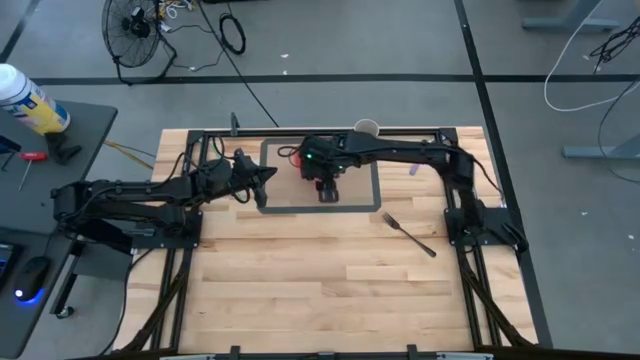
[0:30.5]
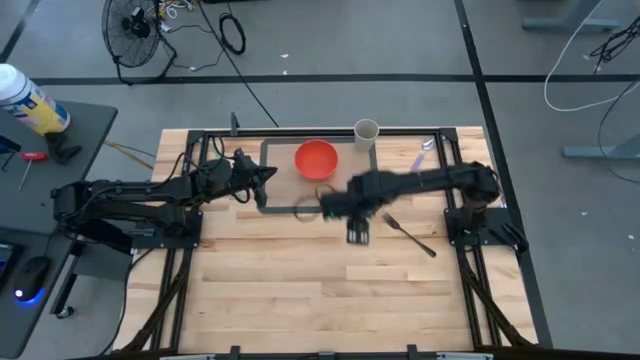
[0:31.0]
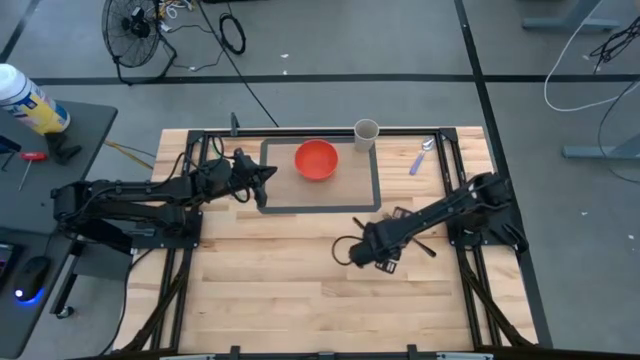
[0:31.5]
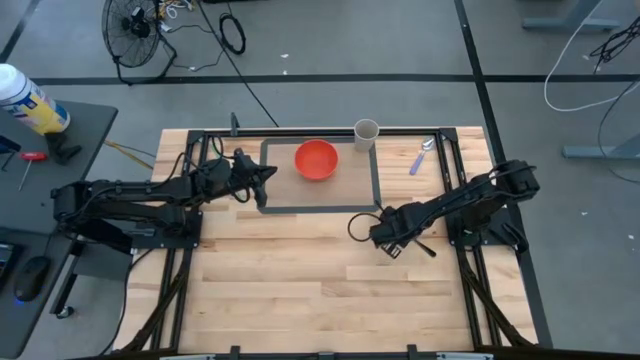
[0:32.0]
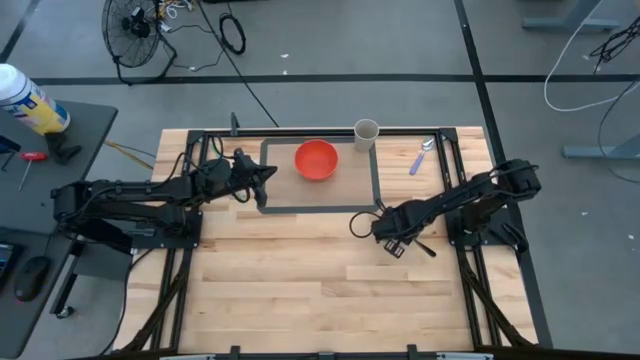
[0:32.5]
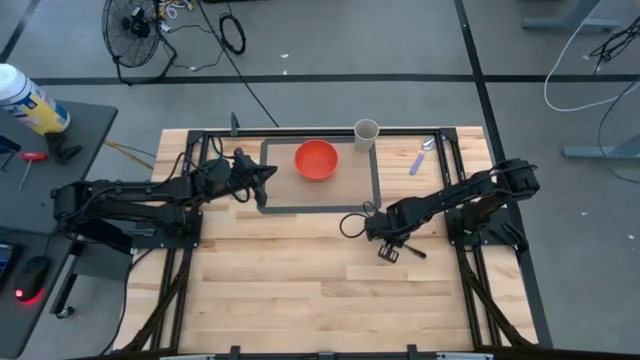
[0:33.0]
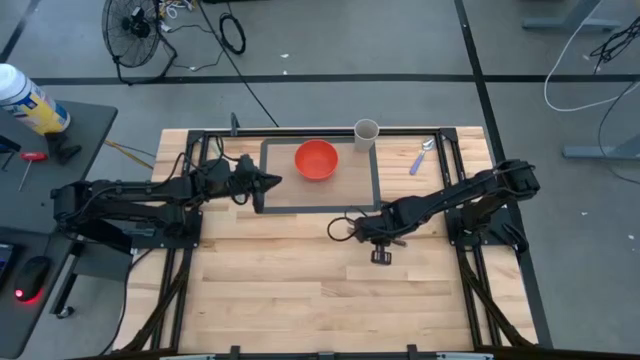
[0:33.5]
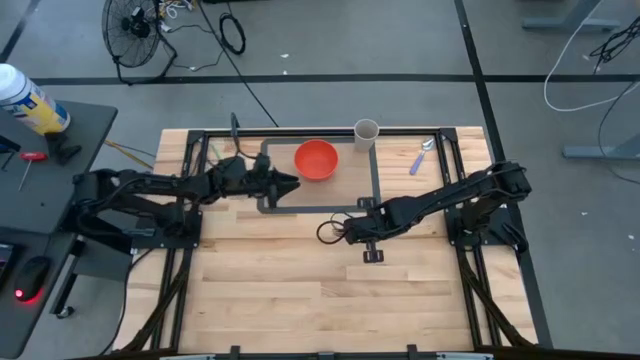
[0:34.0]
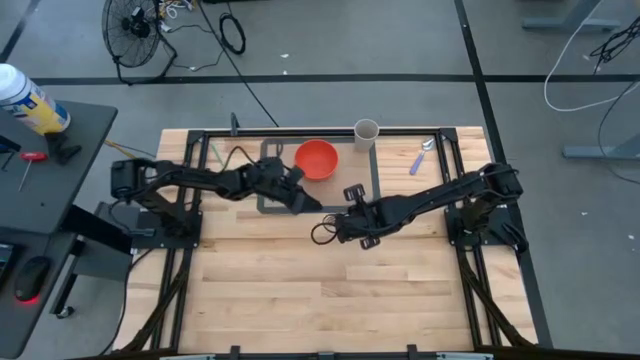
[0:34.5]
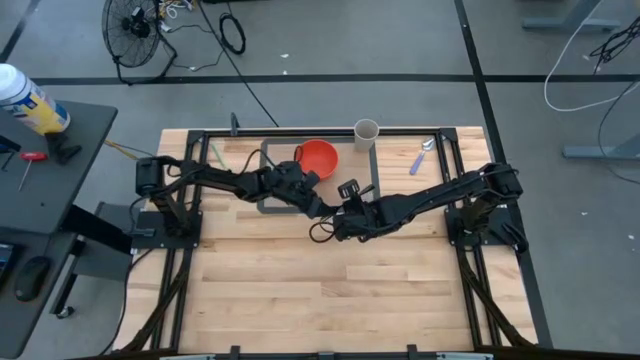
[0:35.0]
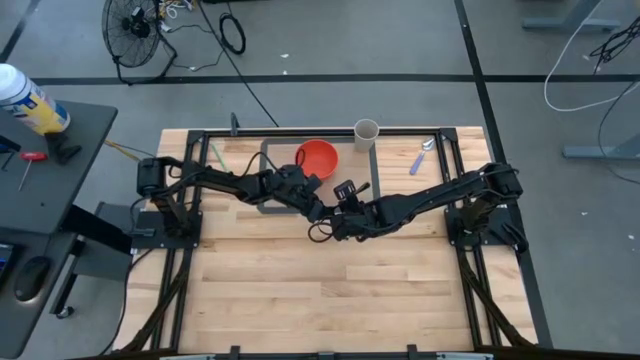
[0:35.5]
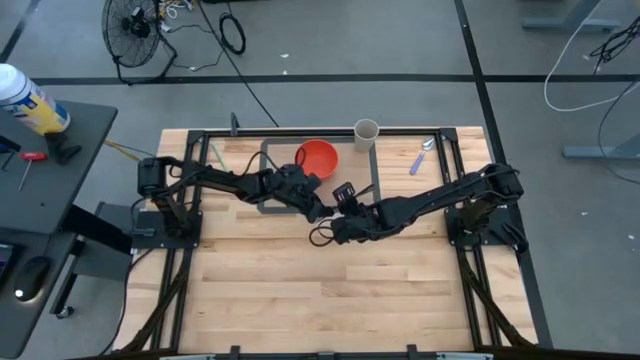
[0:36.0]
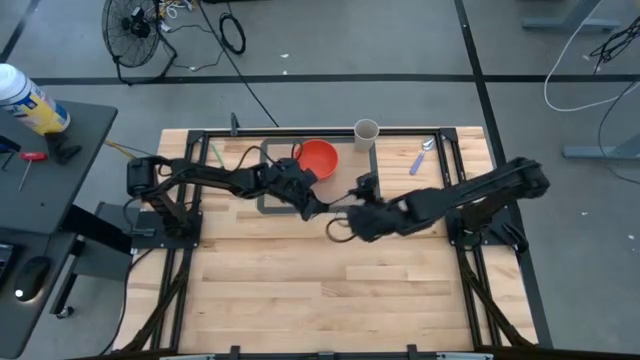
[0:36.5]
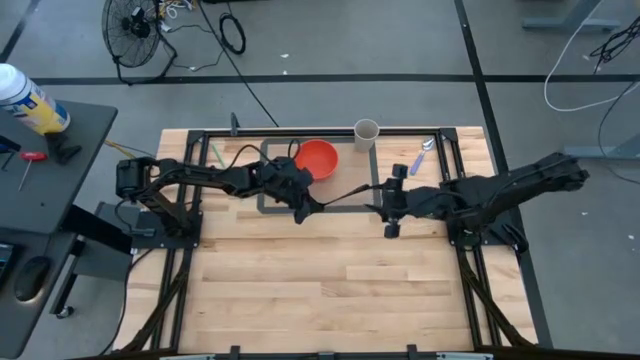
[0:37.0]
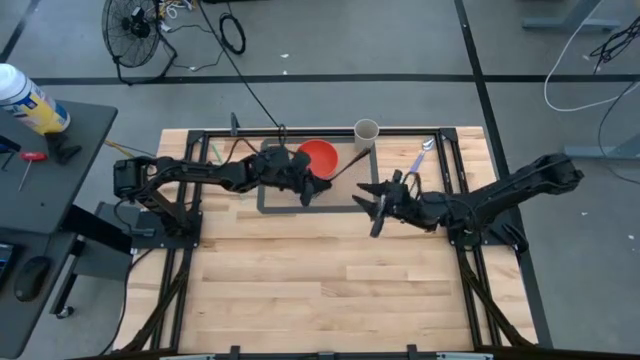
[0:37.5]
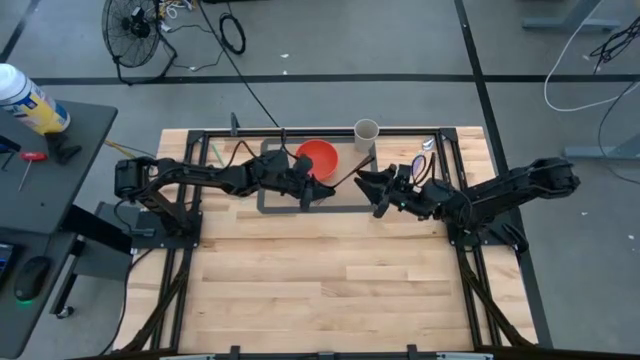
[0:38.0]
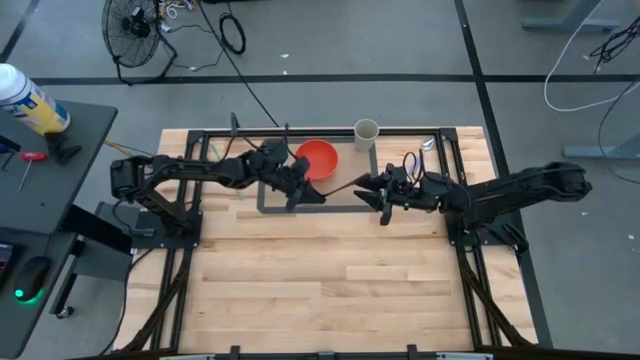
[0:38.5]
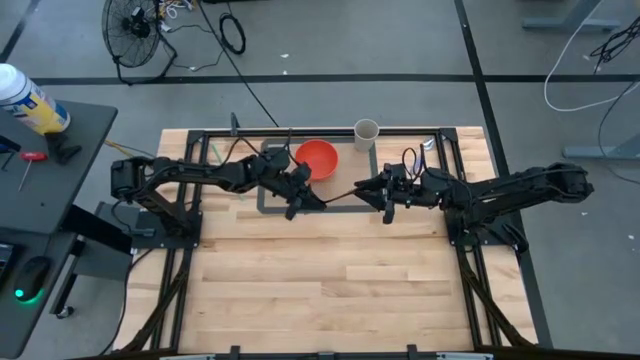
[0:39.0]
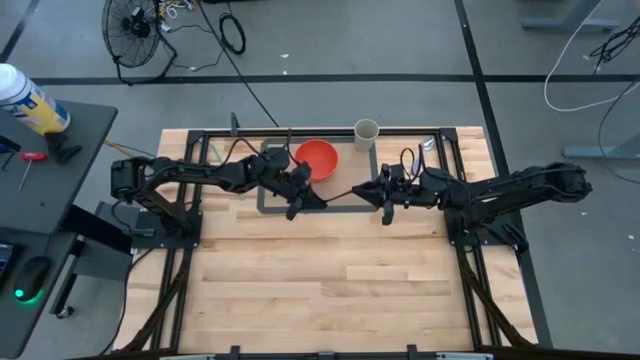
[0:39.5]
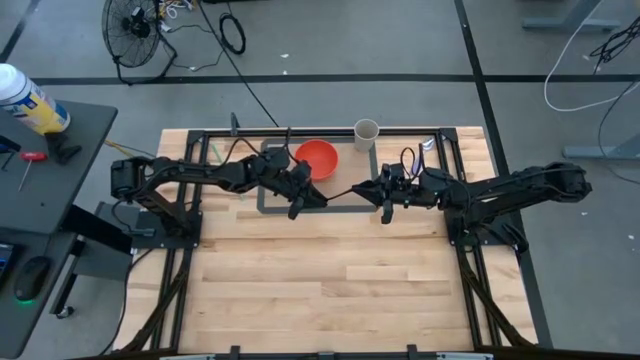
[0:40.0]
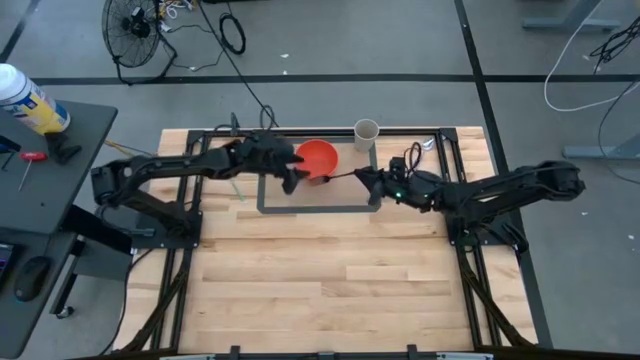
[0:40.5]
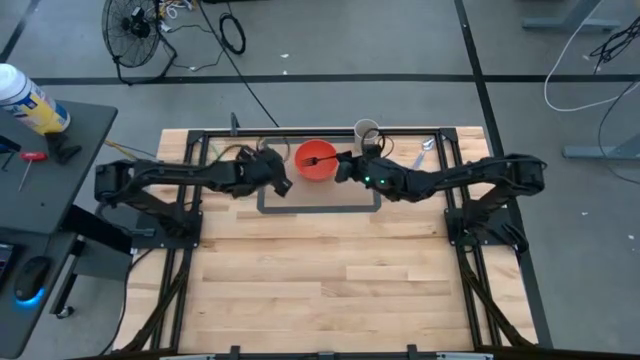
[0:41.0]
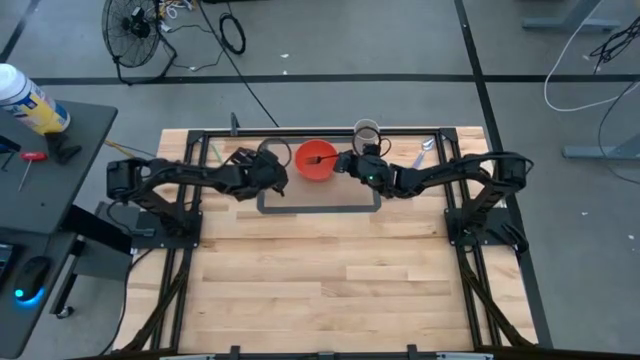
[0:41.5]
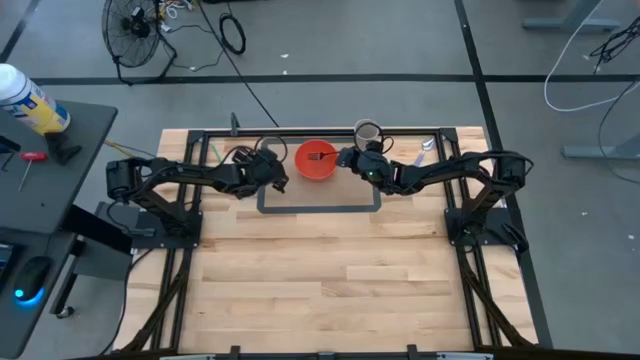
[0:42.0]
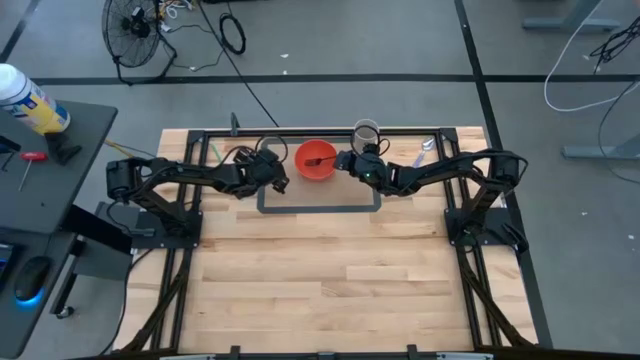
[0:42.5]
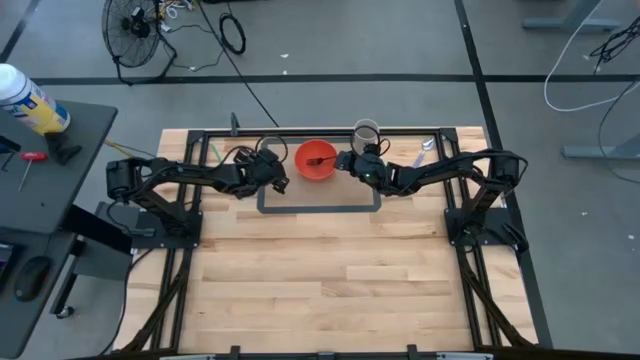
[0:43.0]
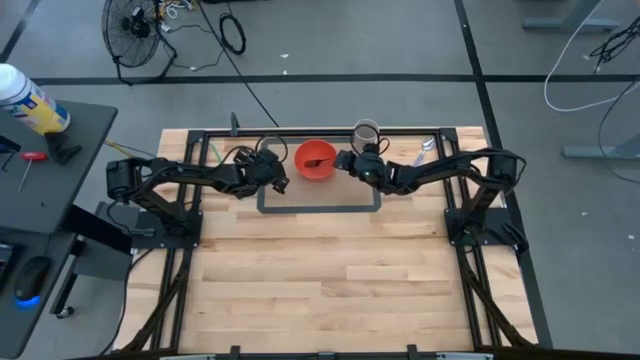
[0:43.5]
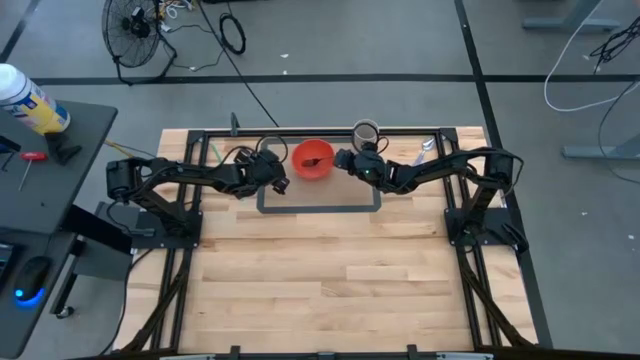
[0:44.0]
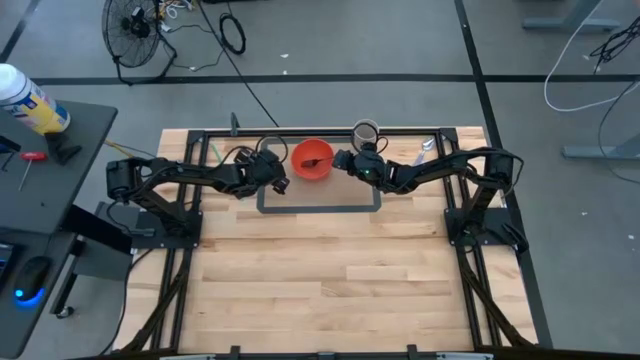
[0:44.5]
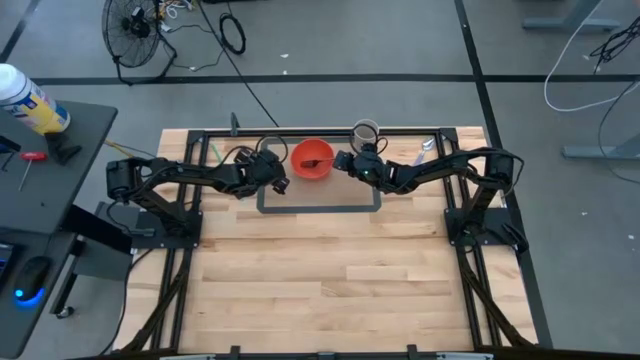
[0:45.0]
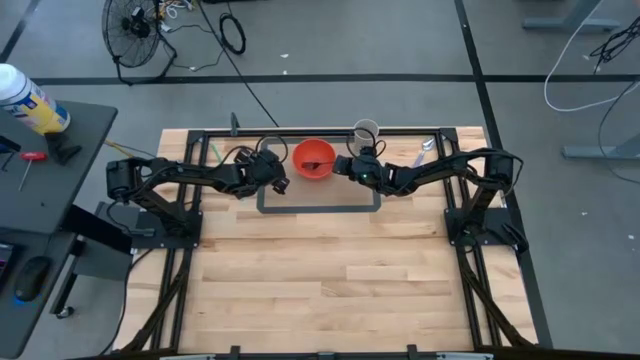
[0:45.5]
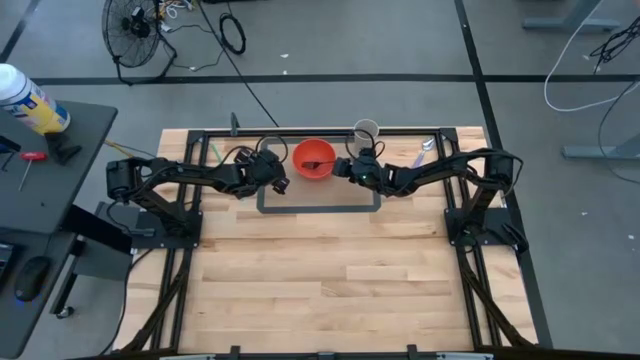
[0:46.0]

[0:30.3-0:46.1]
Task: Pick & Place Utensil
Put the black fork in the orange bowl on the transparent mat

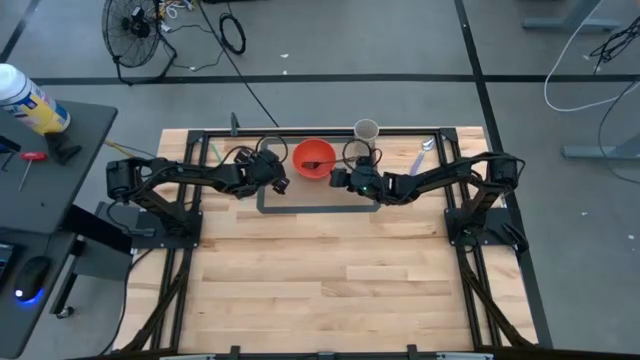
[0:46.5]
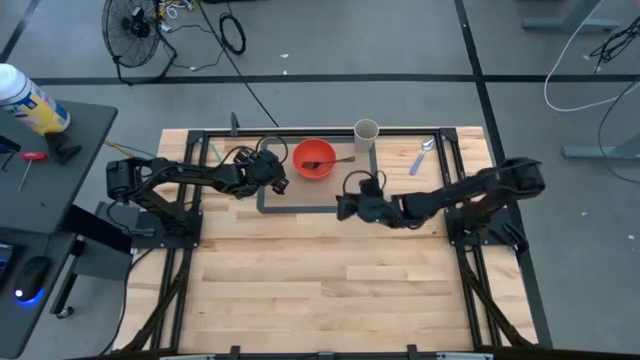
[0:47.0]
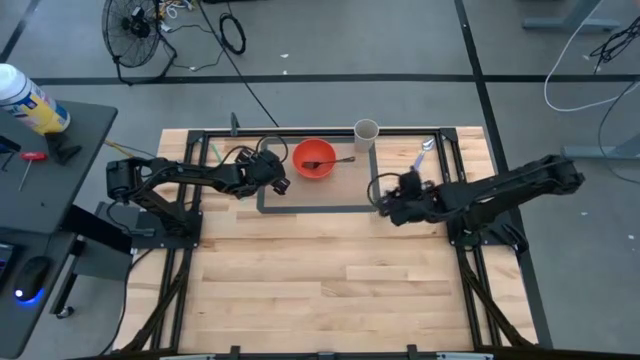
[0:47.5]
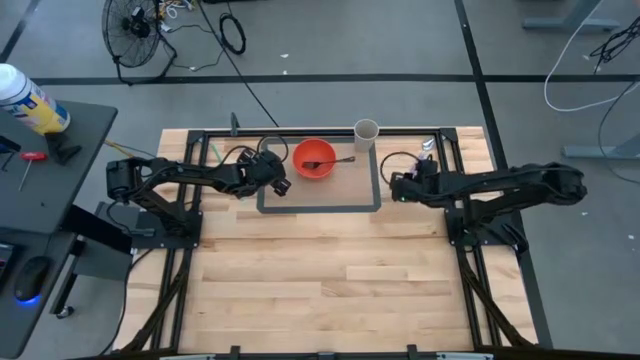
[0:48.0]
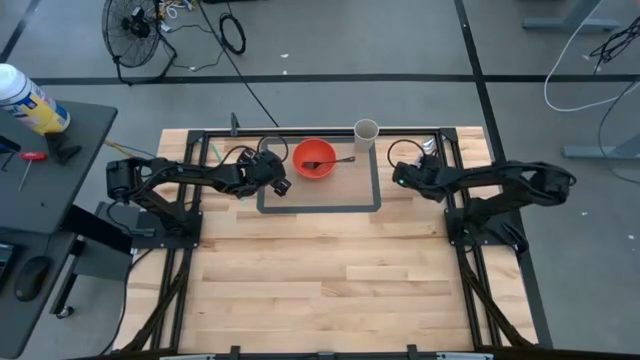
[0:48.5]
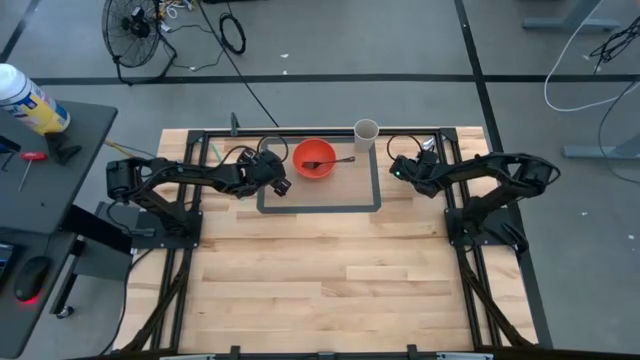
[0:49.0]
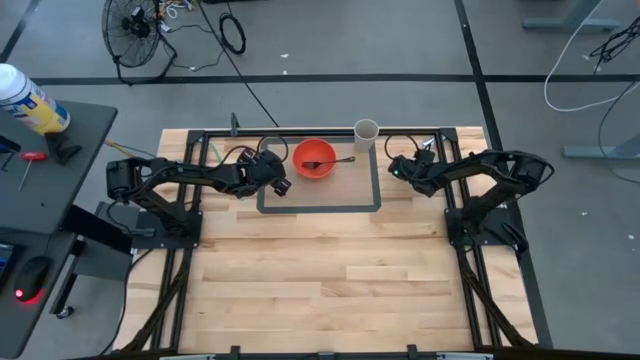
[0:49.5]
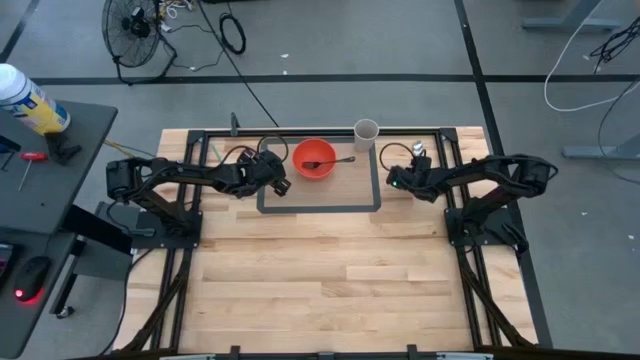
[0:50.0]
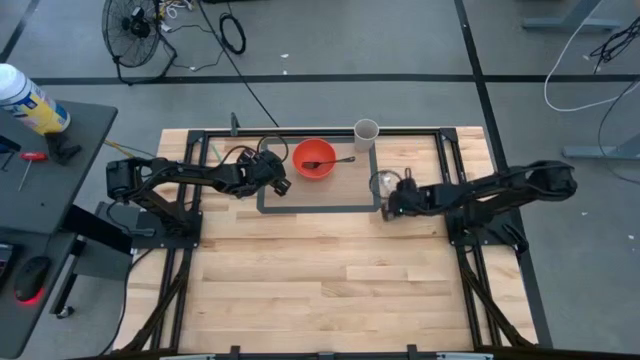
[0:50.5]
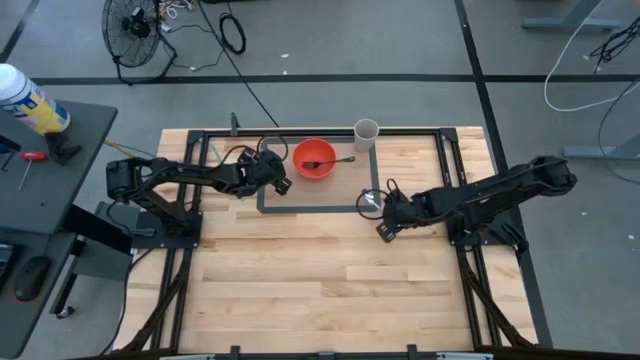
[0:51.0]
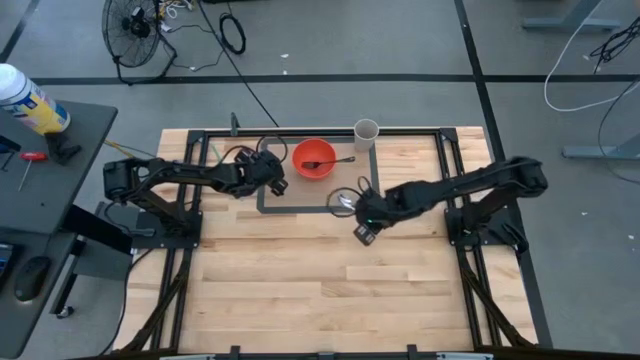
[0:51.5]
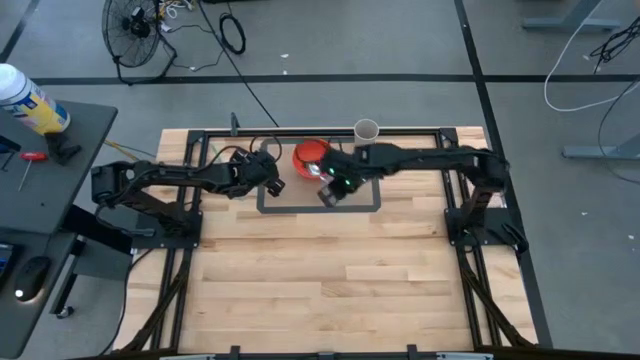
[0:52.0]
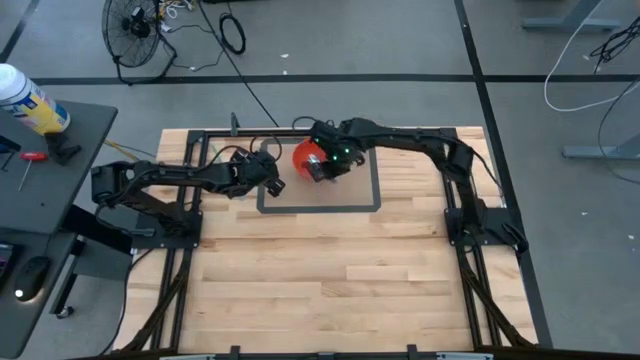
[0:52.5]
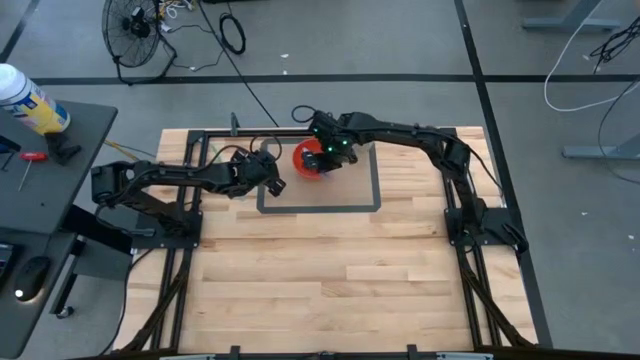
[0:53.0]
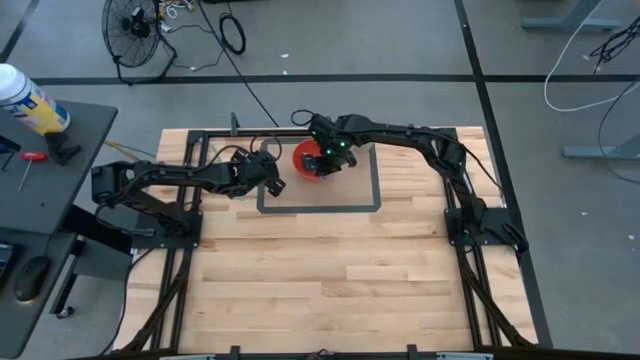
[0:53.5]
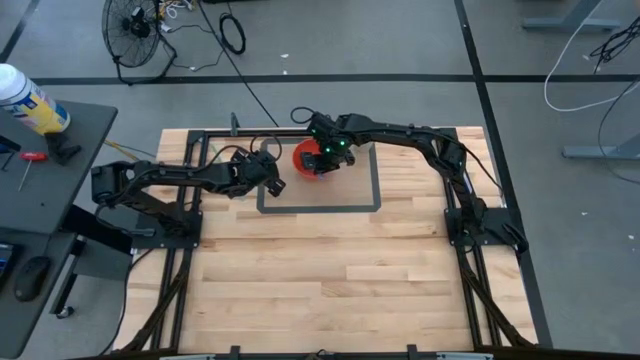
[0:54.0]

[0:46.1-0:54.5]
Put the violet spoon in the orange bowl on the transparent mat
